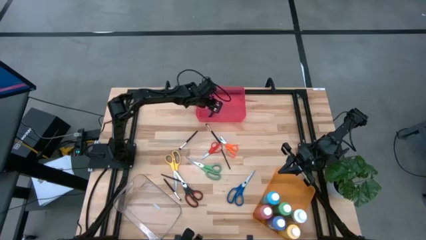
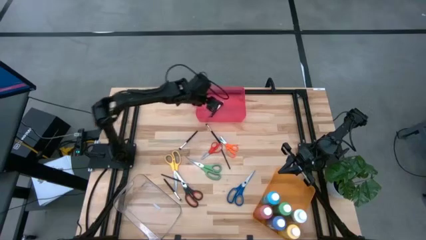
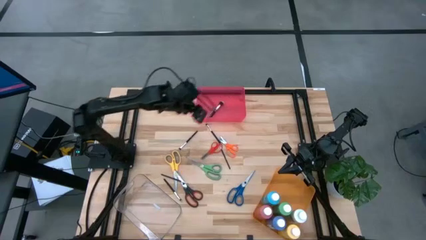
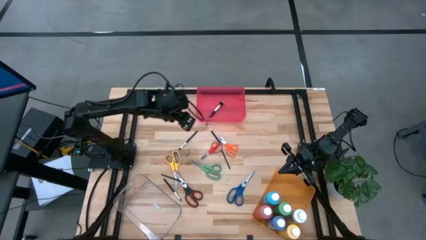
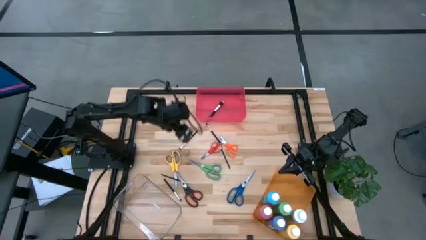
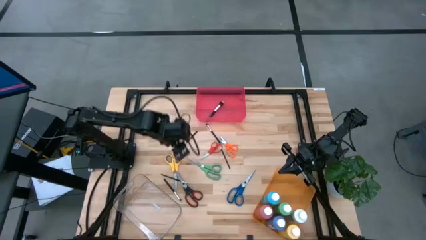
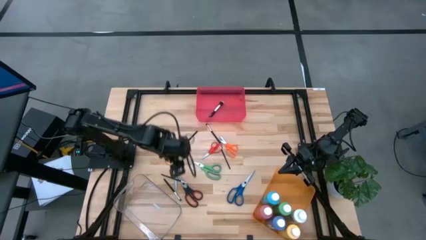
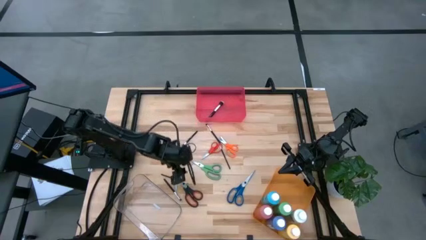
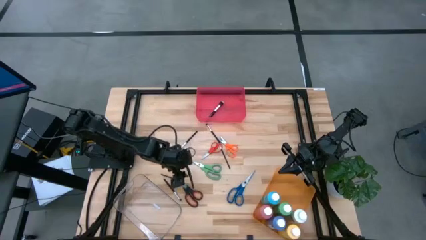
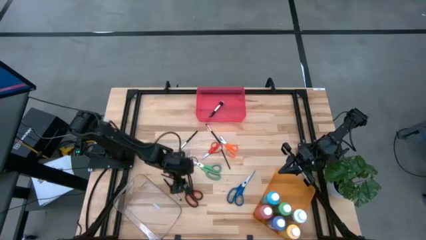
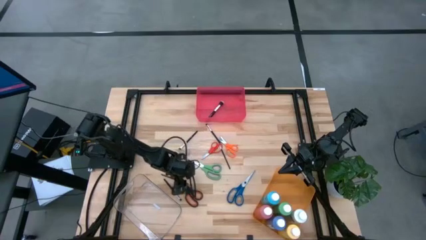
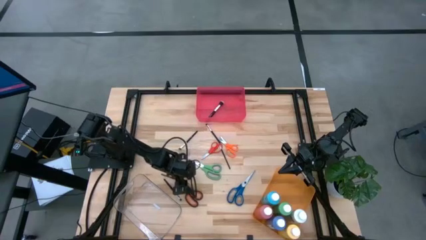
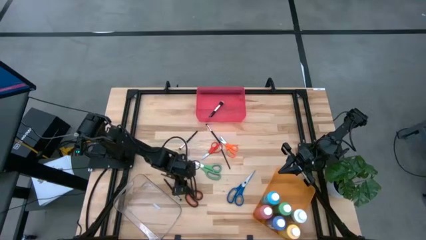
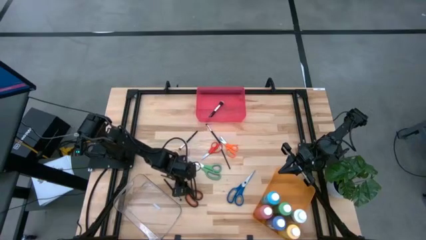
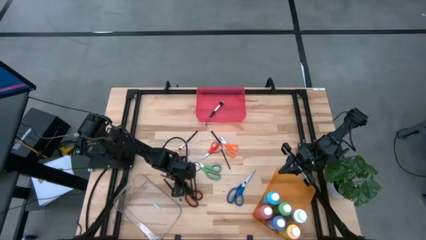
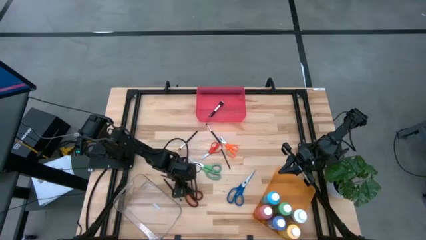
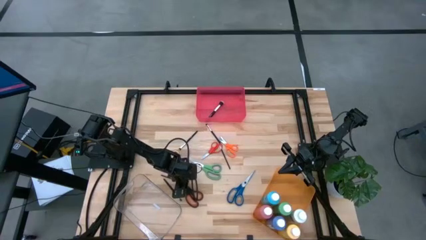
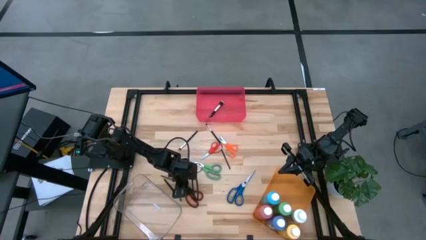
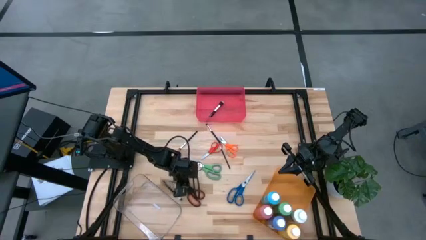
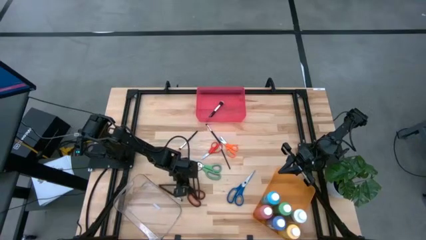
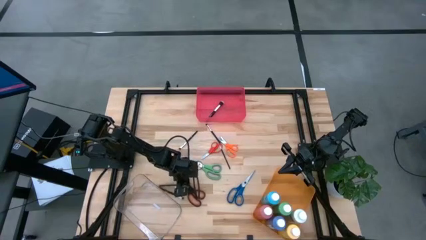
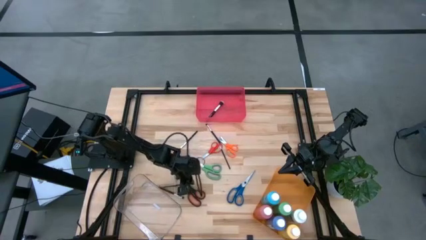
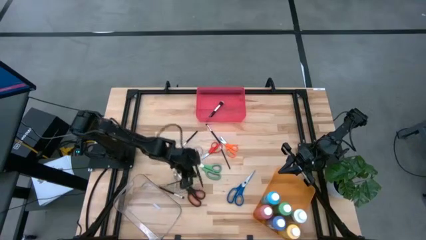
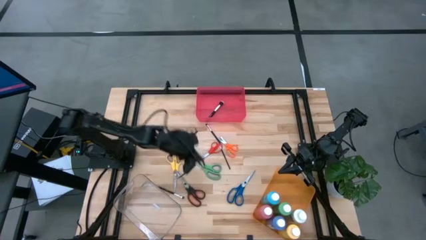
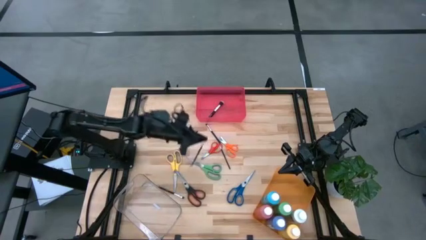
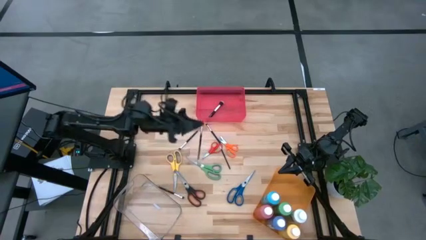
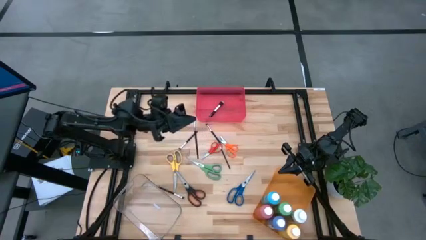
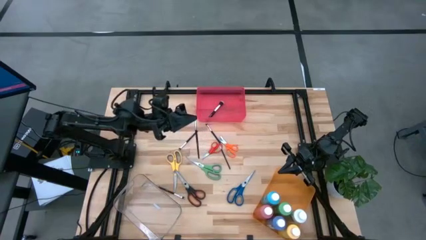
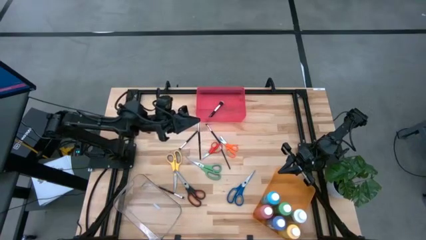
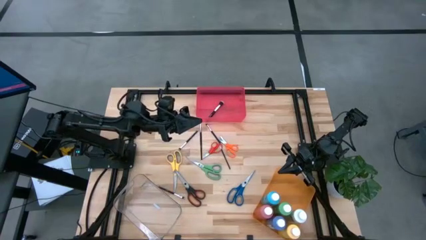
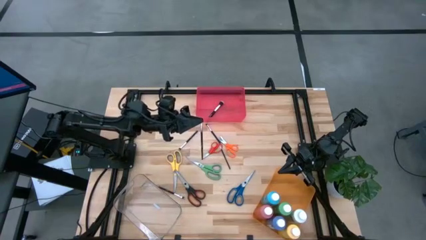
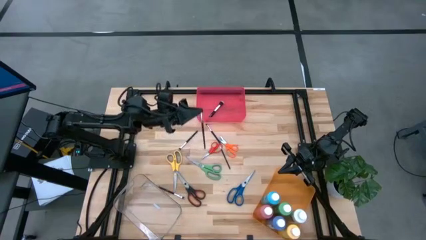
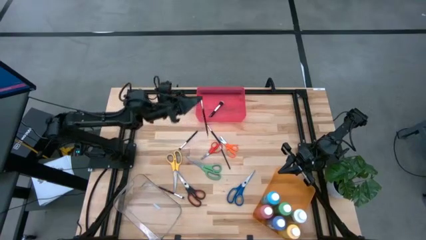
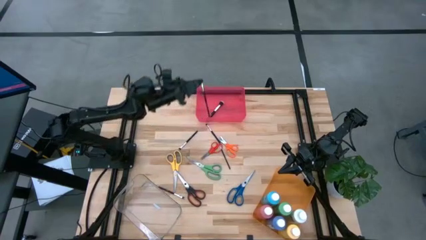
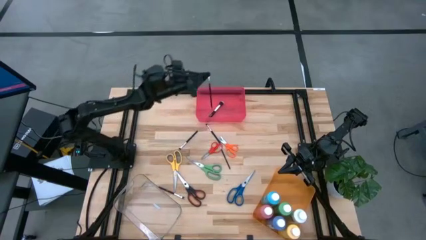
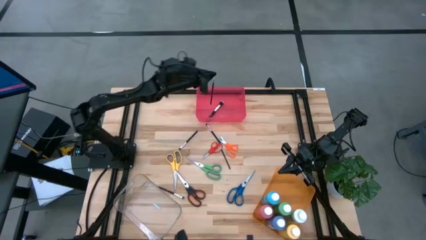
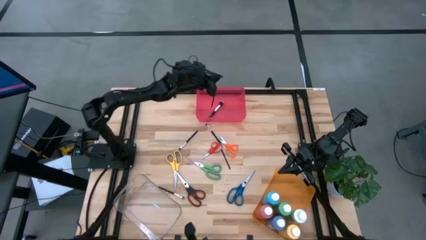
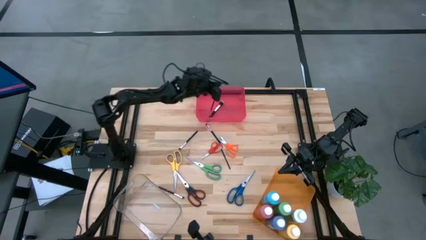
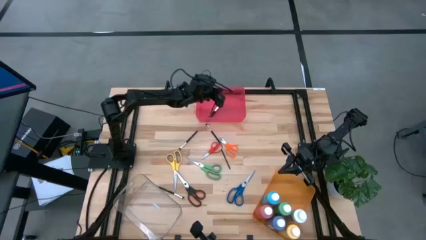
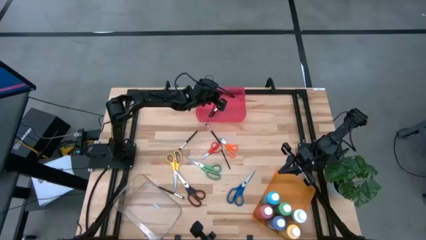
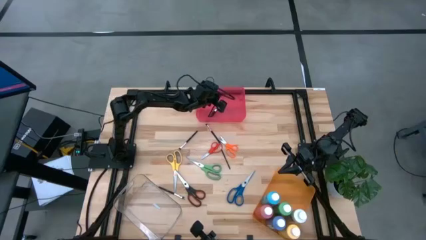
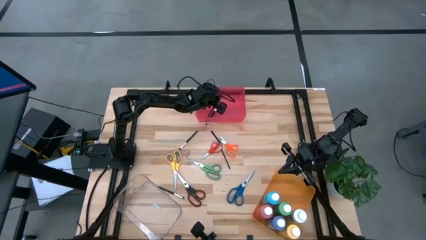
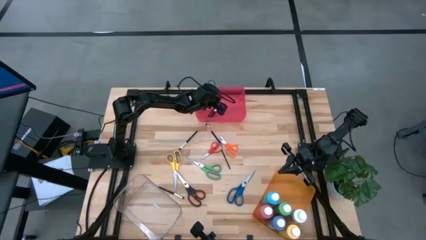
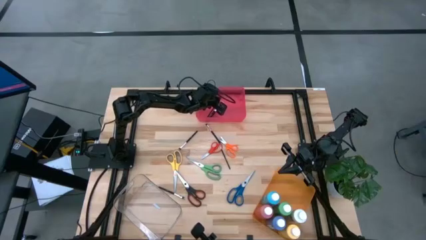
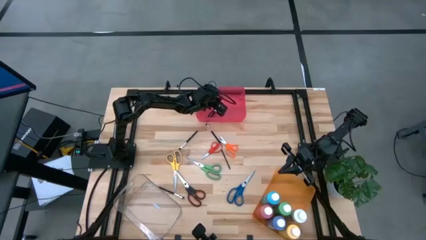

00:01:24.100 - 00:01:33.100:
Task: Pick & Place Paint Supplies
Put the silver brush into the red bin

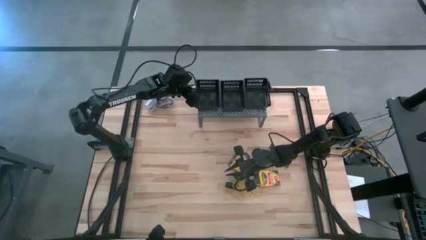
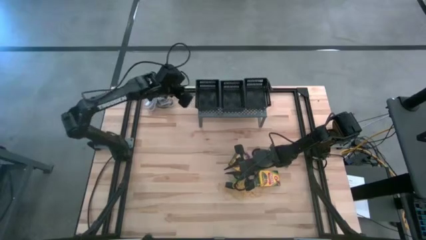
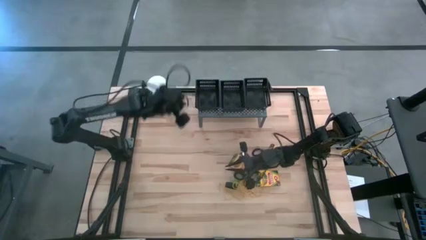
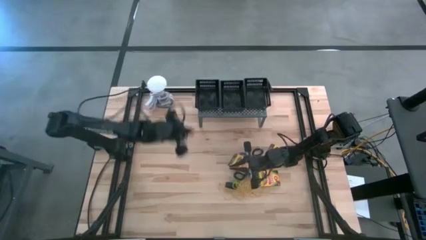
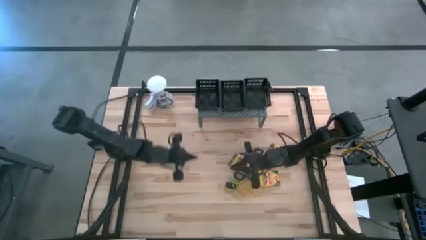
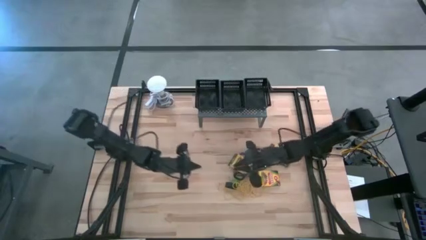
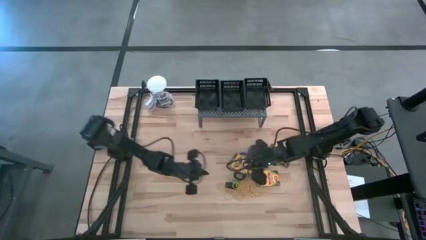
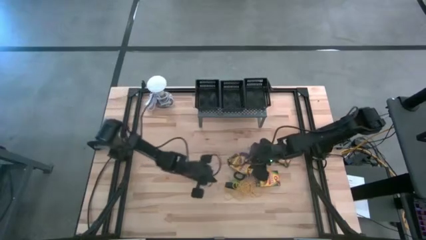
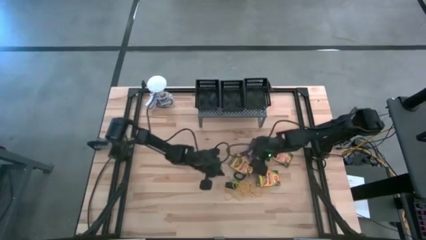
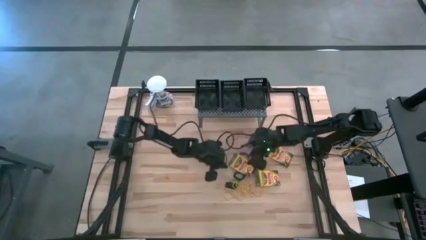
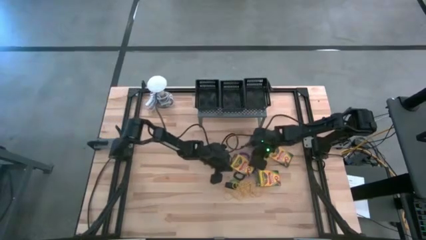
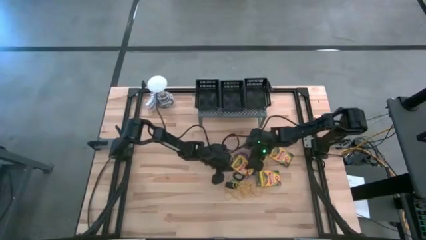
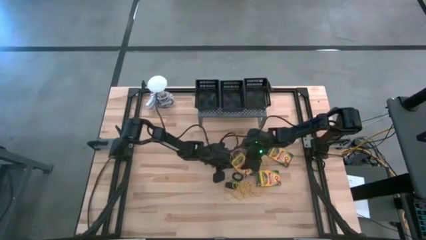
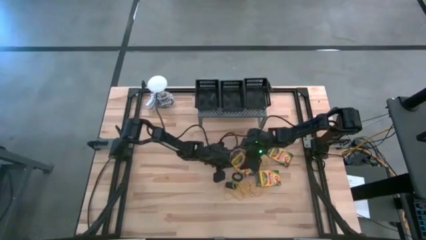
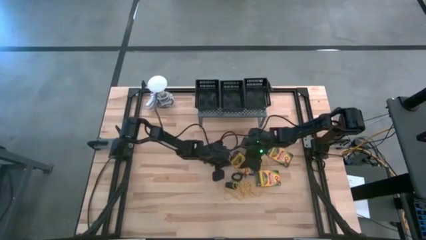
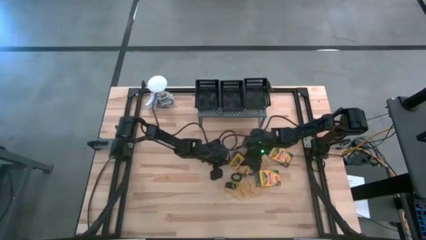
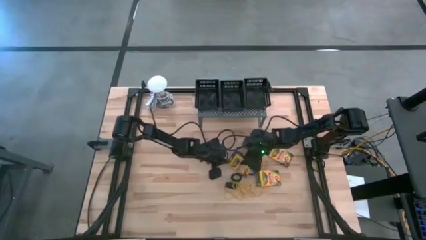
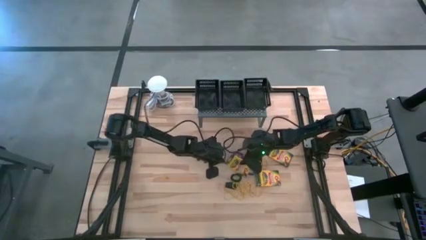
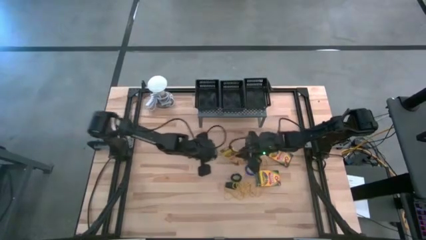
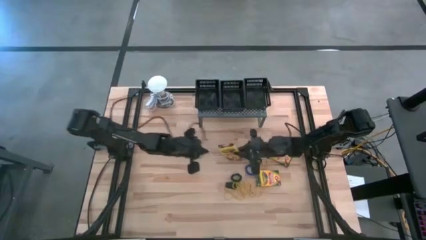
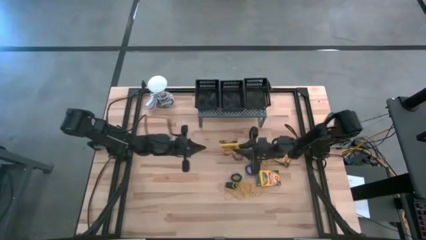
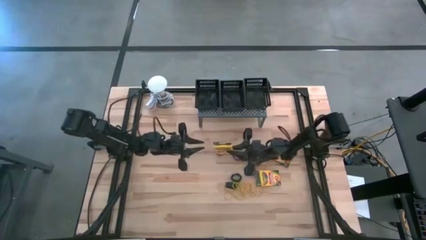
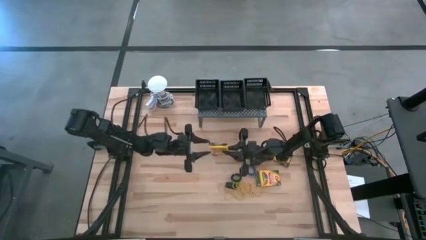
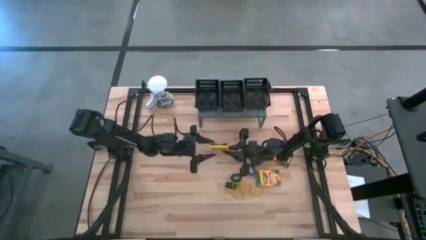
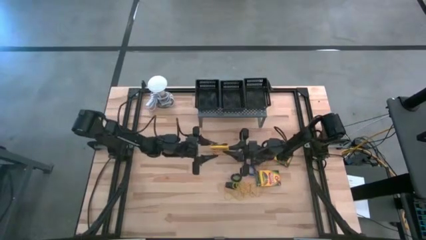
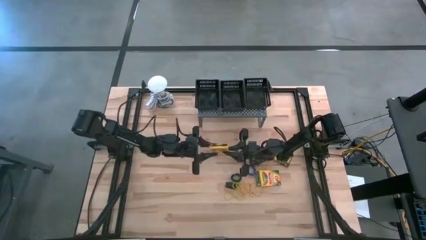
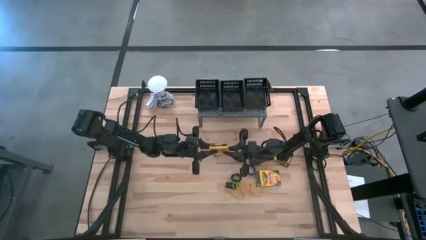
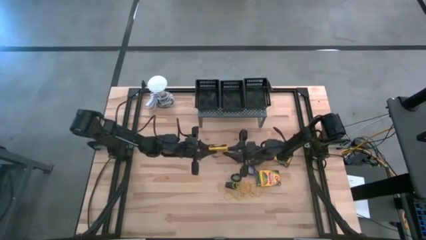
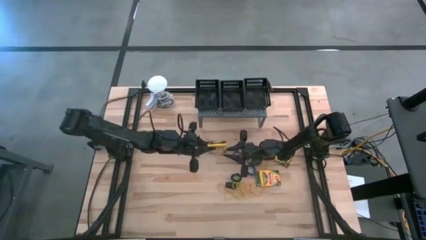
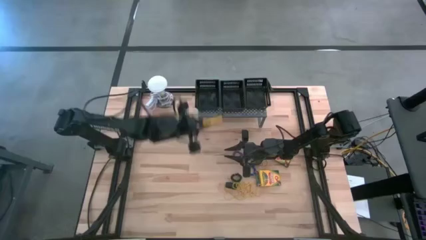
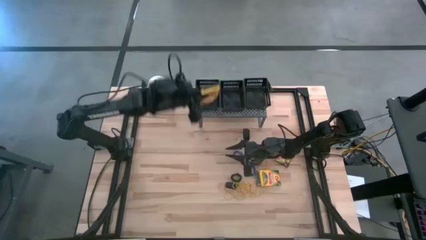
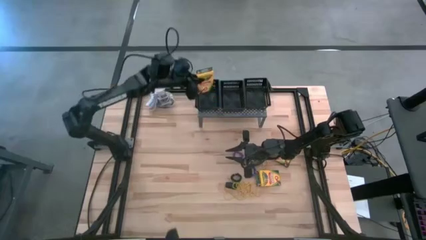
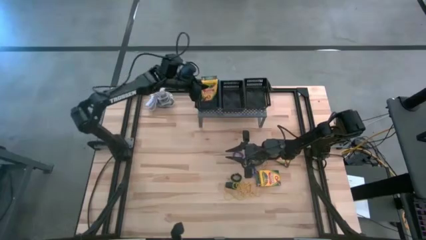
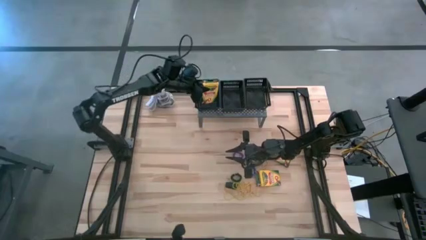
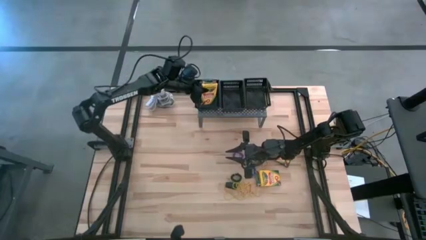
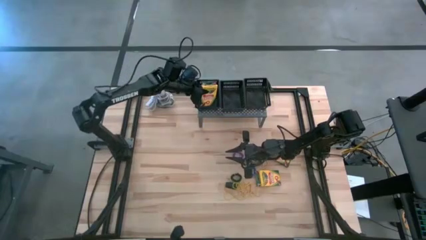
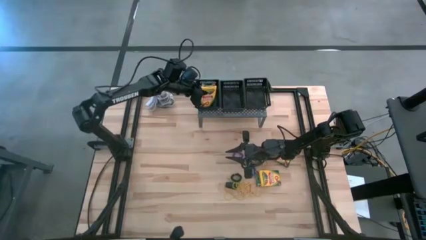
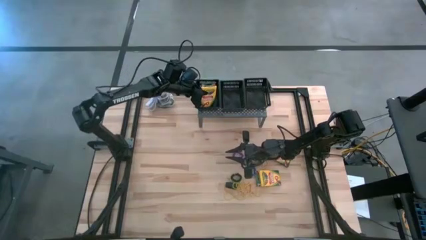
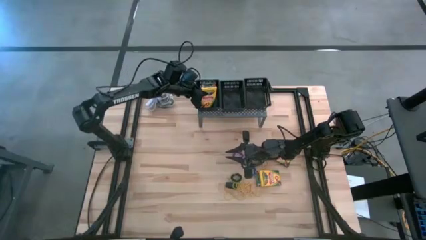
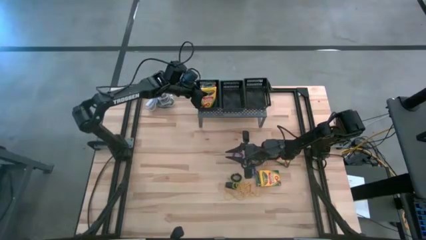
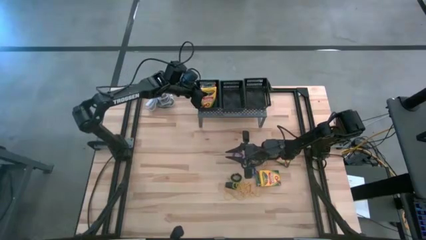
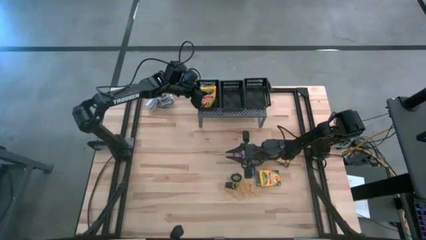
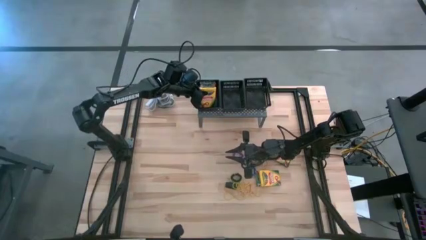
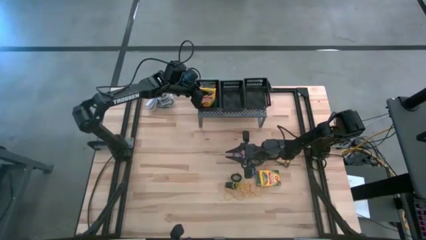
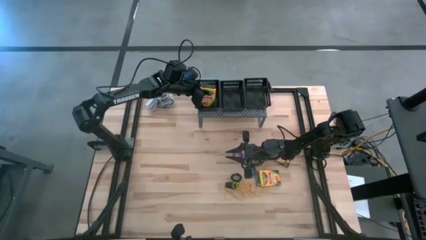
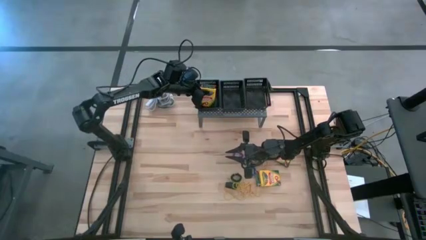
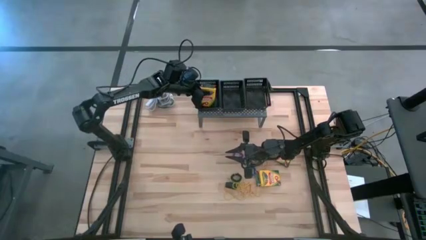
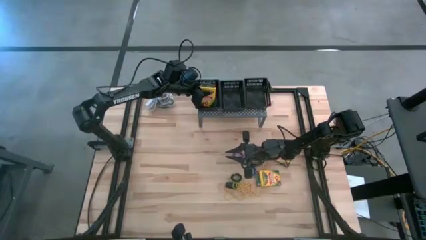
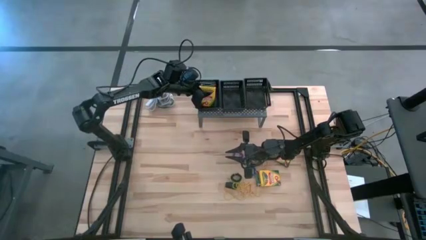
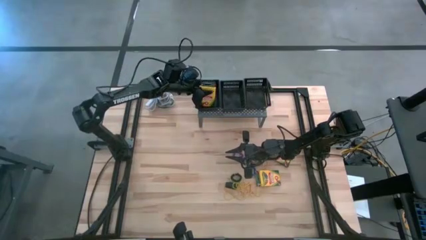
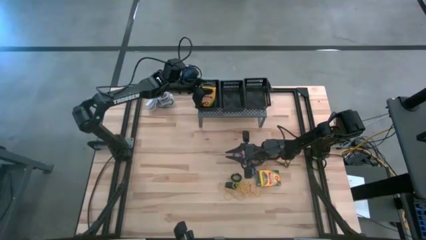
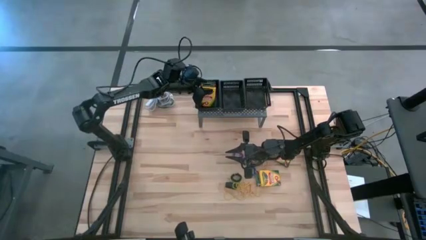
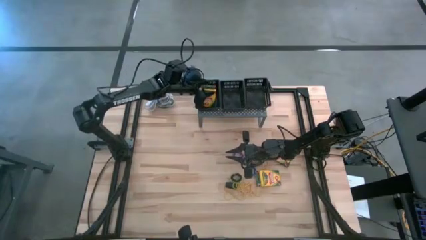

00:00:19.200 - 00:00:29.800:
Task: Pick & Place Office Desk Supplies
Put the yellow crayon box into the left black bin on the shelf
